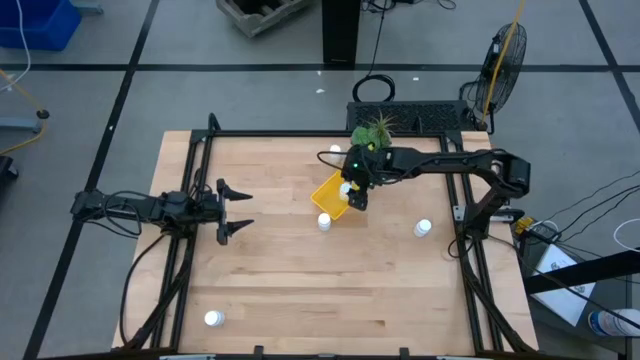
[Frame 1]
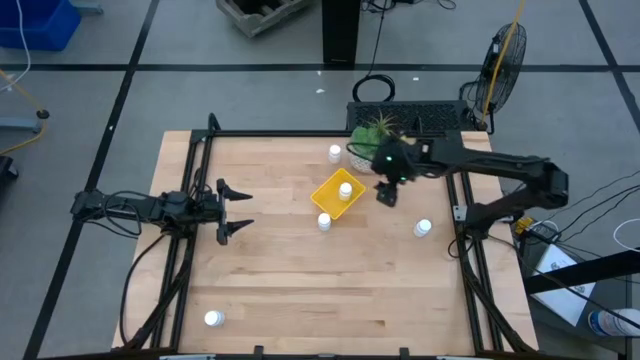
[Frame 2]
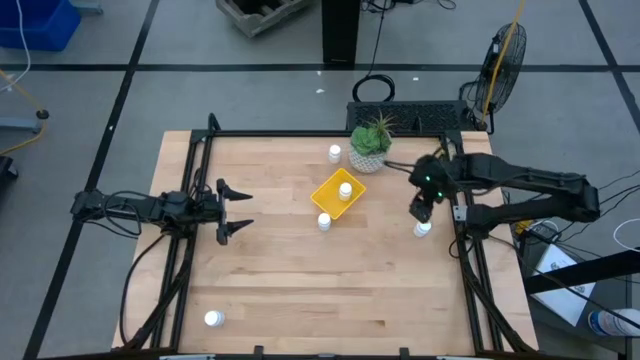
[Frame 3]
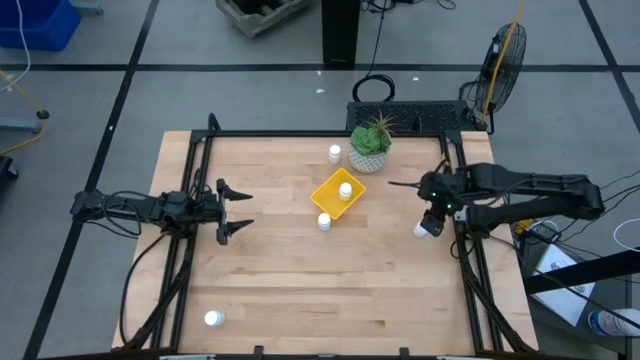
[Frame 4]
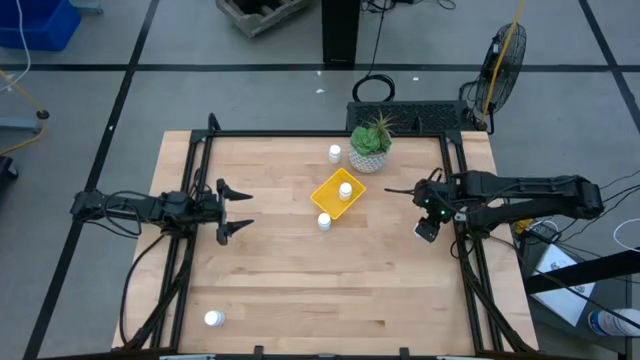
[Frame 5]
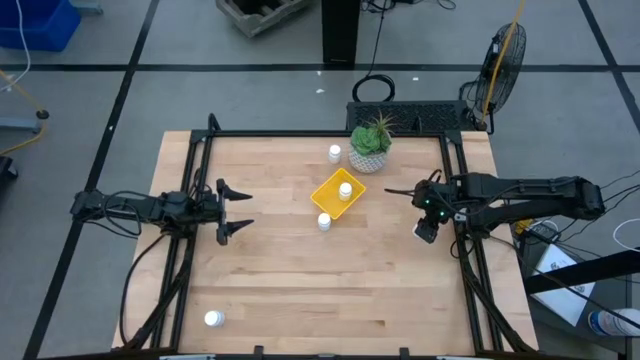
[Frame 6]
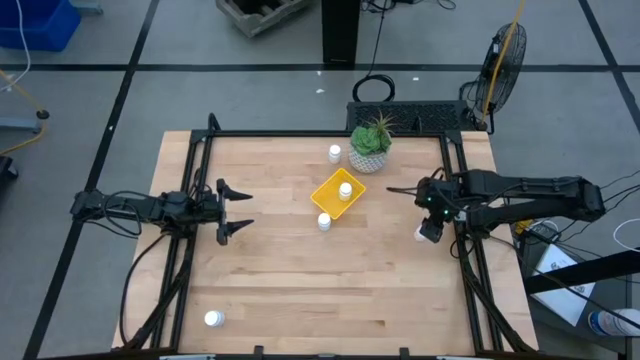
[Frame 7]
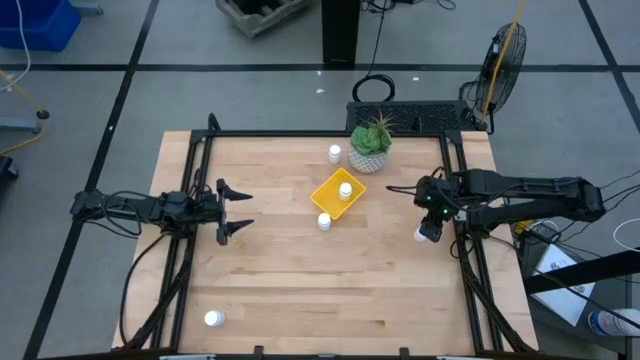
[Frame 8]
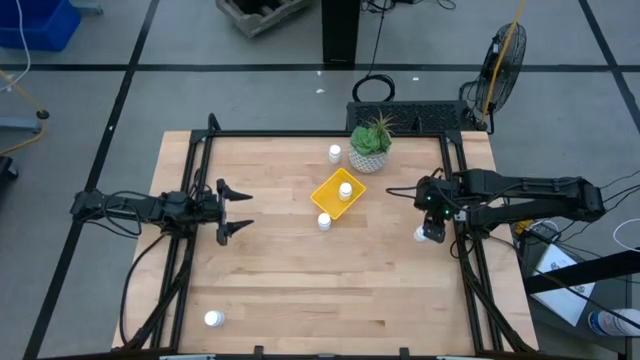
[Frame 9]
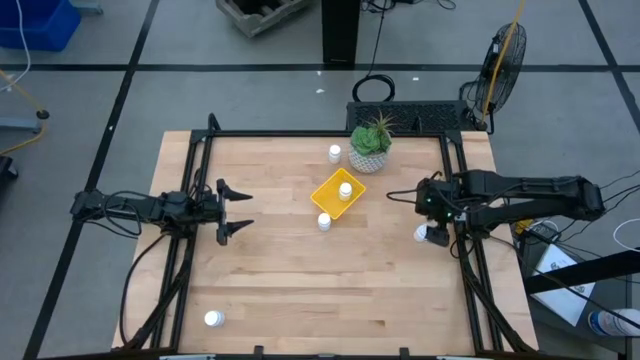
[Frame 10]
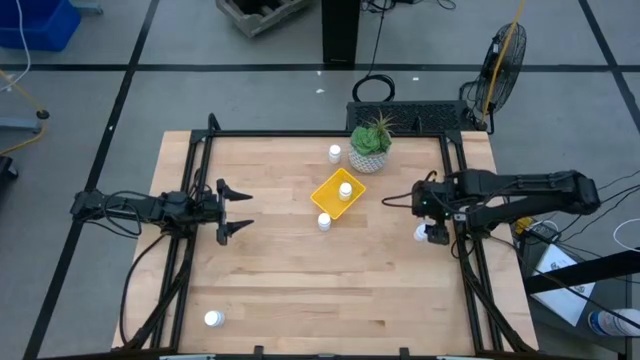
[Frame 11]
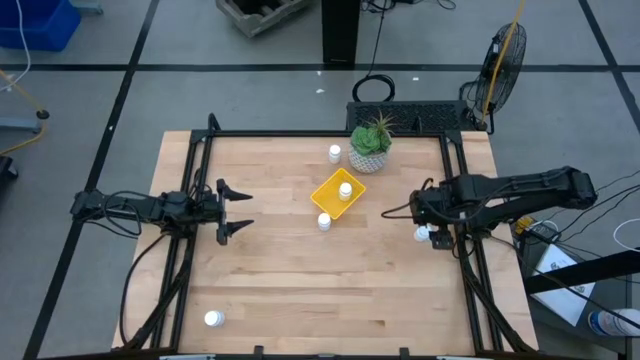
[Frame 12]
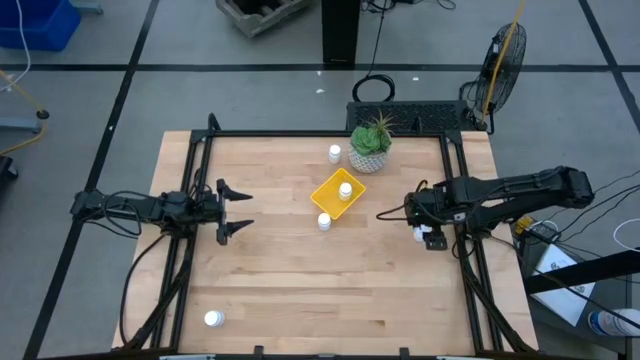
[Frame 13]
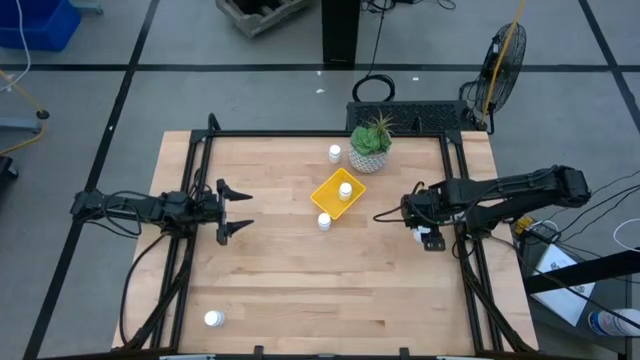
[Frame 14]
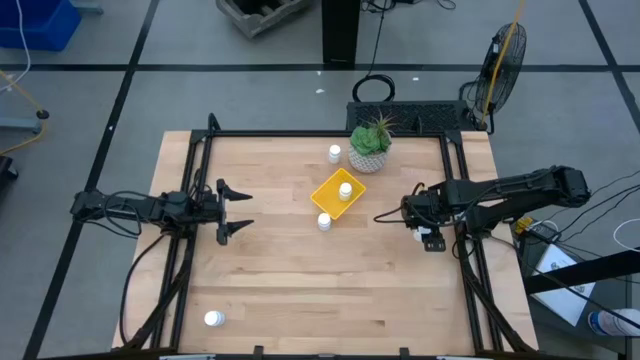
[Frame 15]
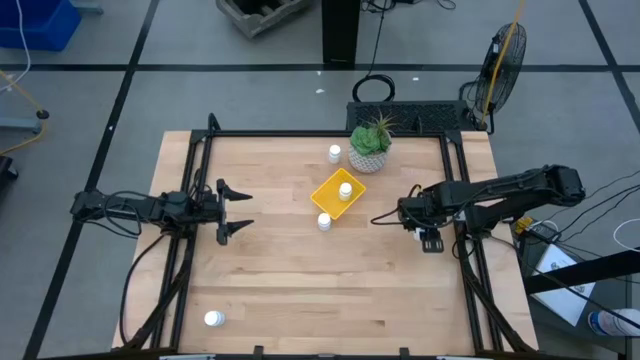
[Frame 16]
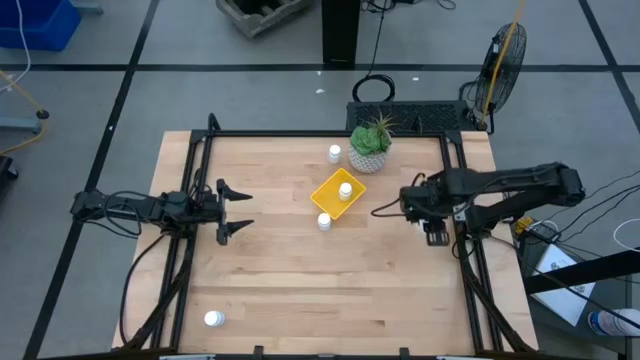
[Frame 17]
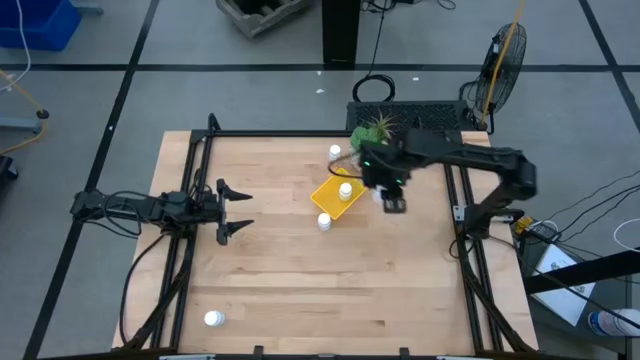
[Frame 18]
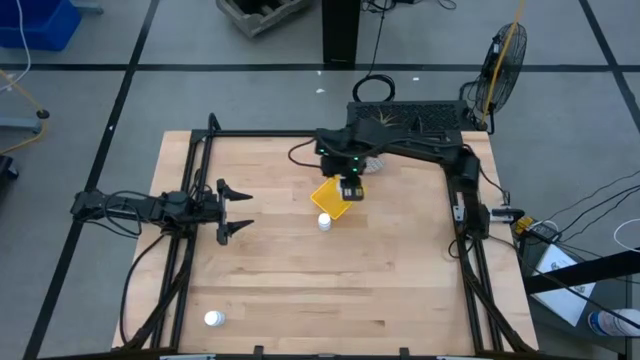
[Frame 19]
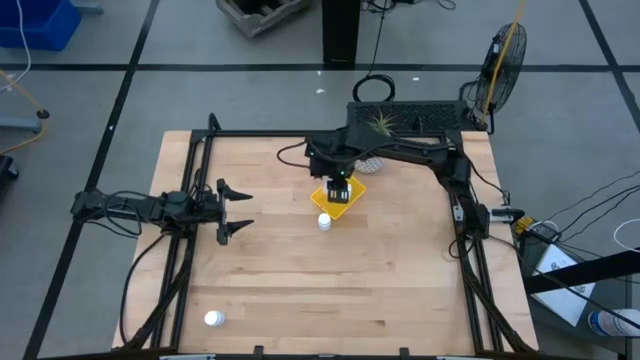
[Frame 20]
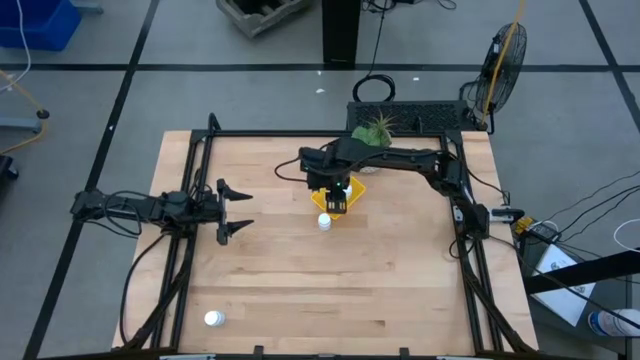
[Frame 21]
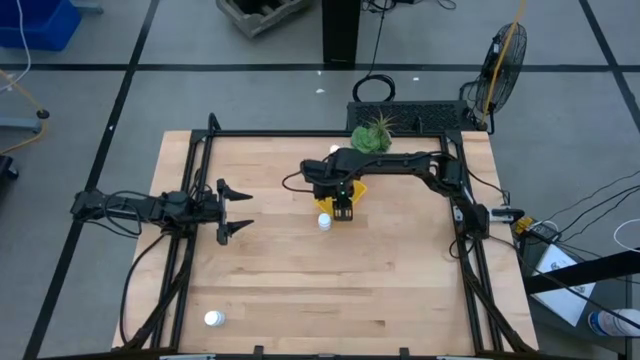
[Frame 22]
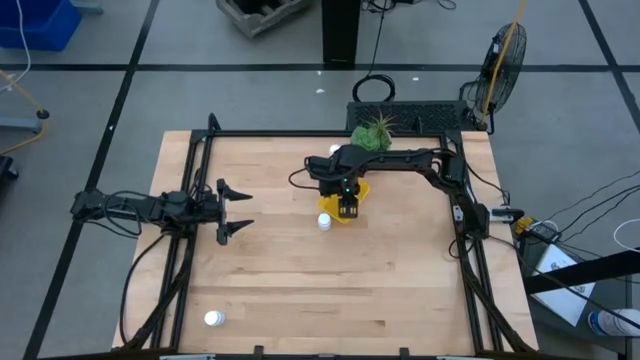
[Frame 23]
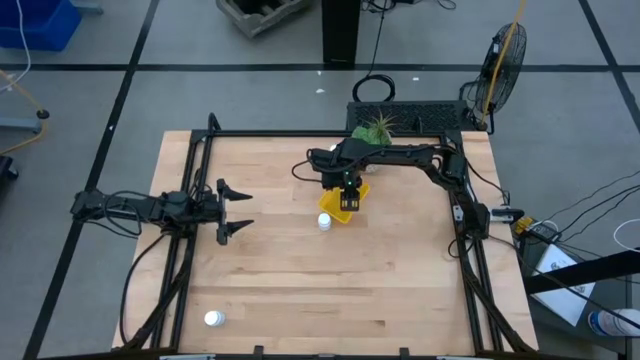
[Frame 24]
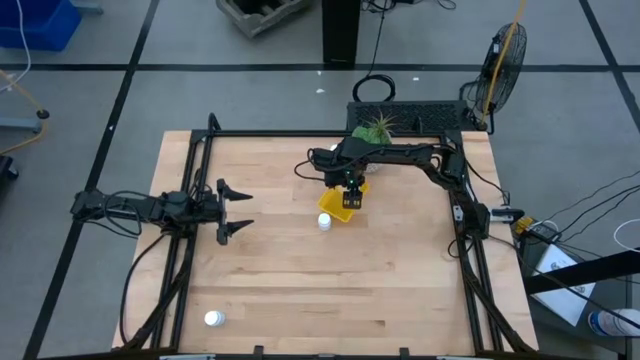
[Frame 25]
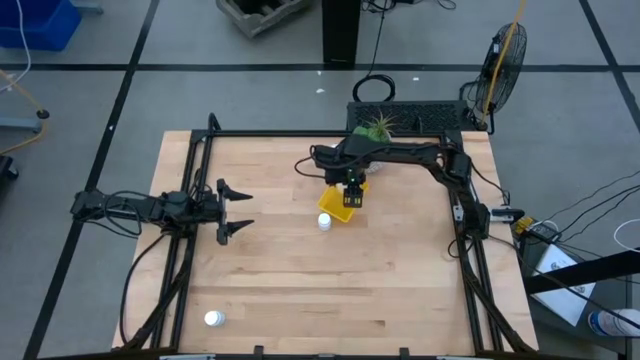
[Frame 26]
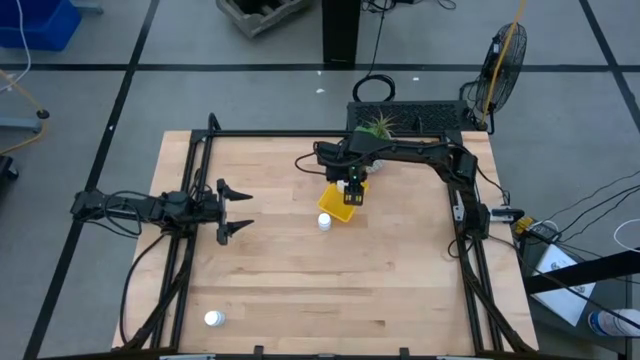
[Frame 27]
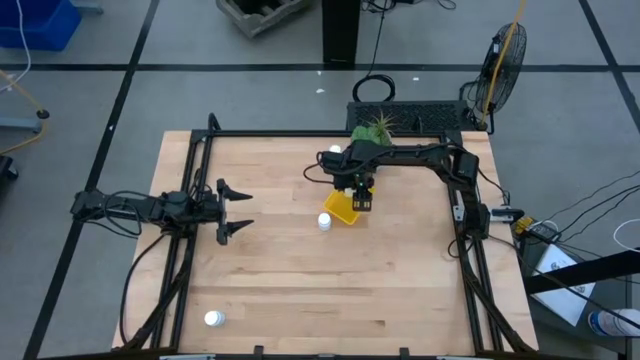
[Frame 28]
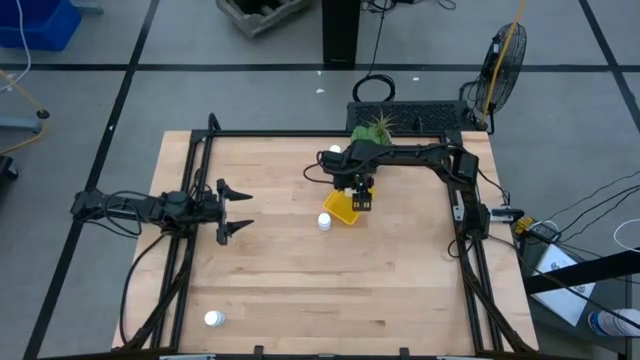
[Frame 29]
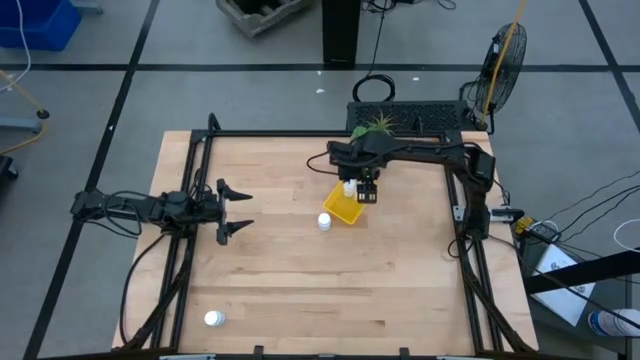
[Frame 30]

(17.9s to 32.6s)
Task: Pick and place pill bottles into a basket
Put the middle right white medicine bottle into the bin
